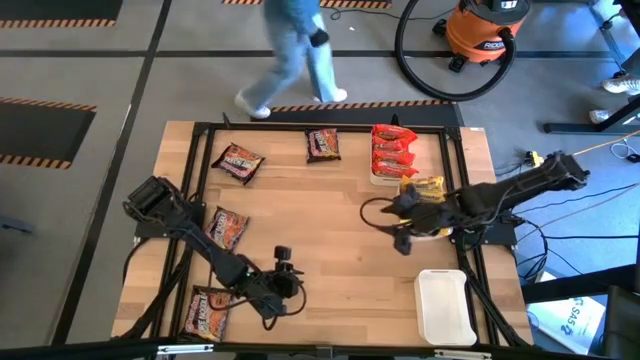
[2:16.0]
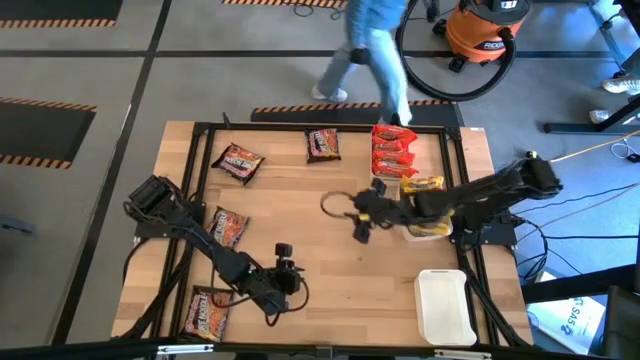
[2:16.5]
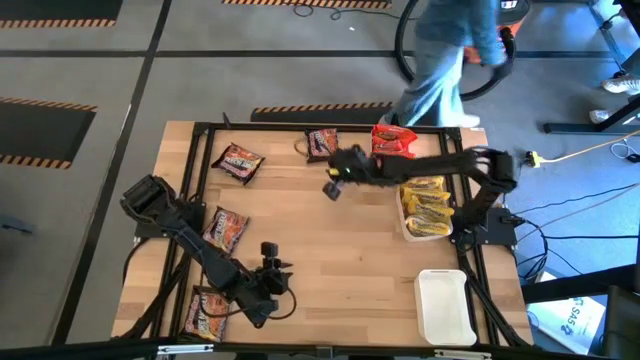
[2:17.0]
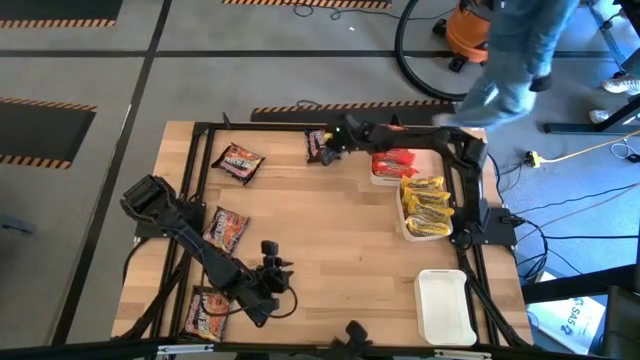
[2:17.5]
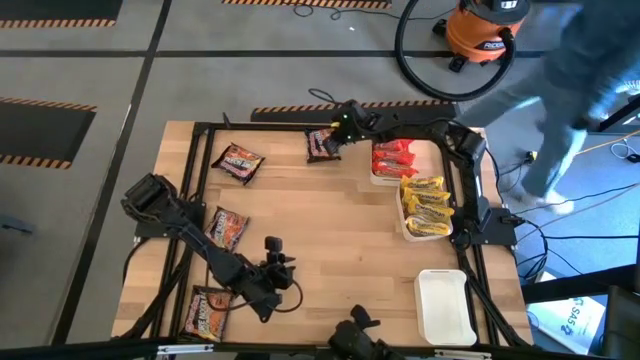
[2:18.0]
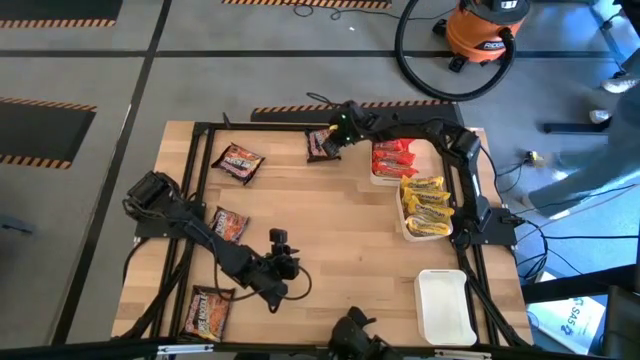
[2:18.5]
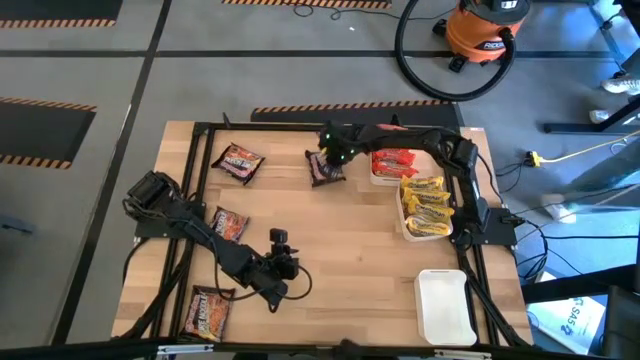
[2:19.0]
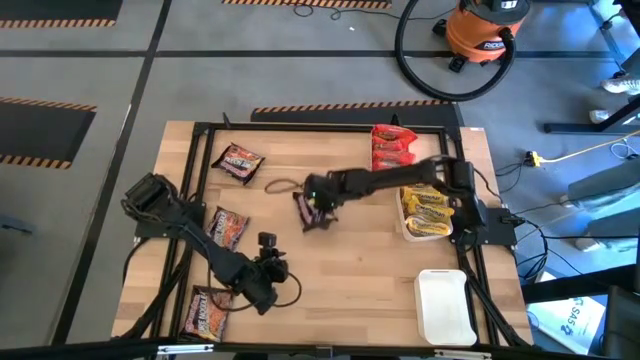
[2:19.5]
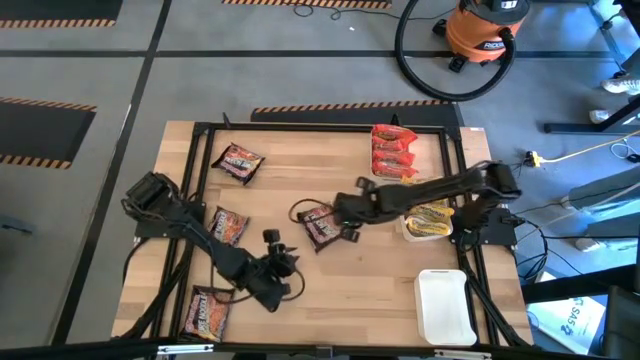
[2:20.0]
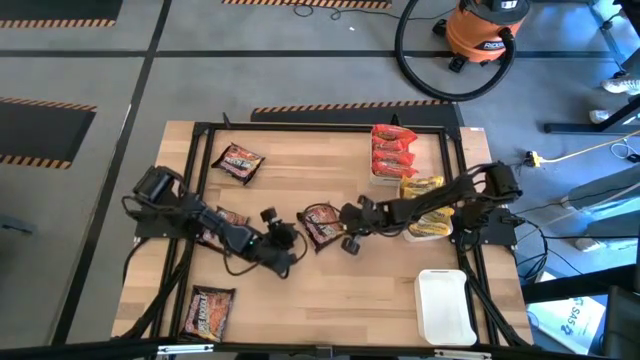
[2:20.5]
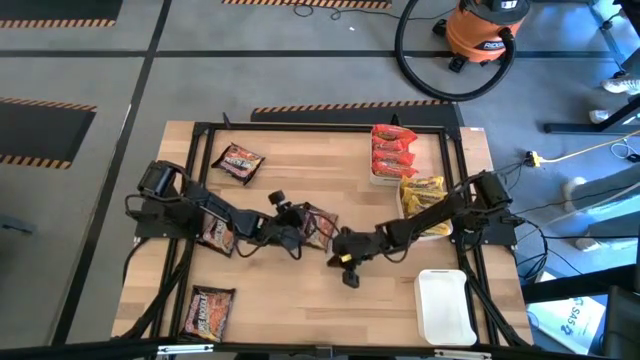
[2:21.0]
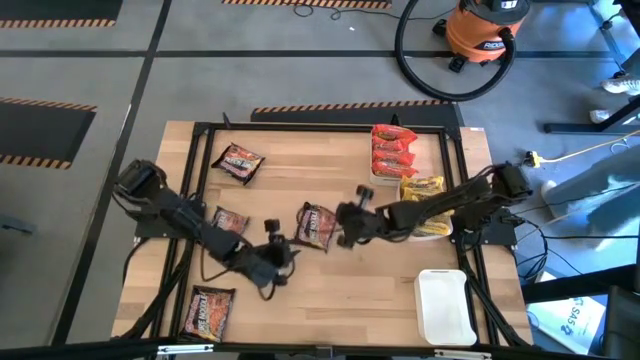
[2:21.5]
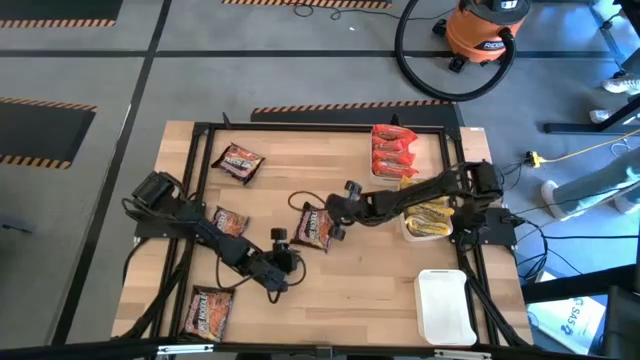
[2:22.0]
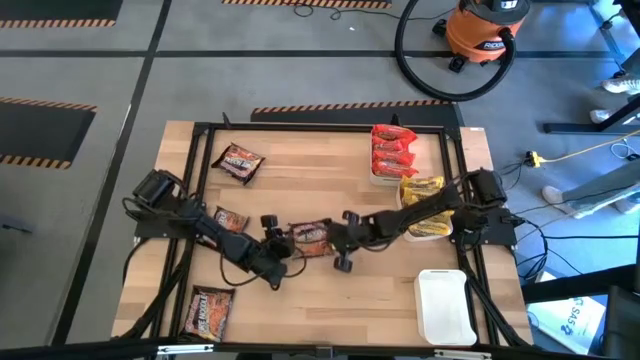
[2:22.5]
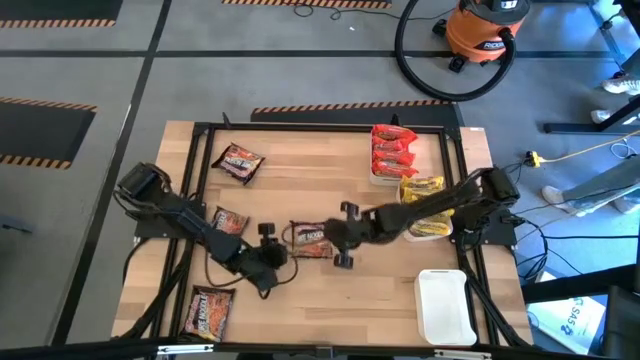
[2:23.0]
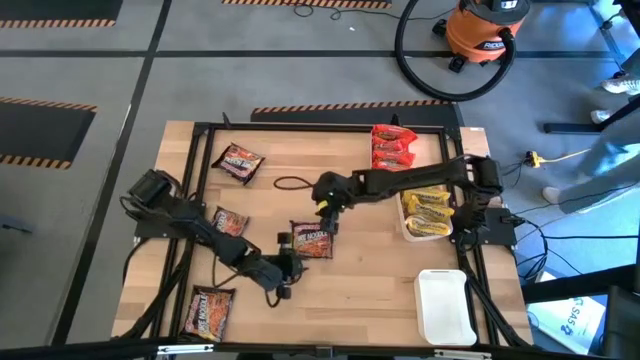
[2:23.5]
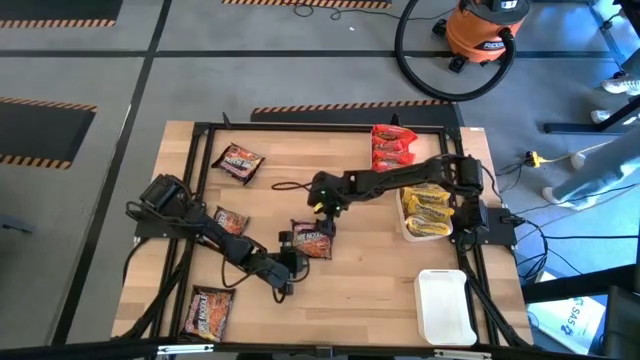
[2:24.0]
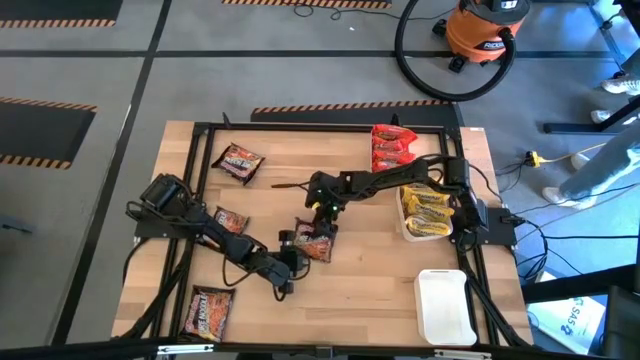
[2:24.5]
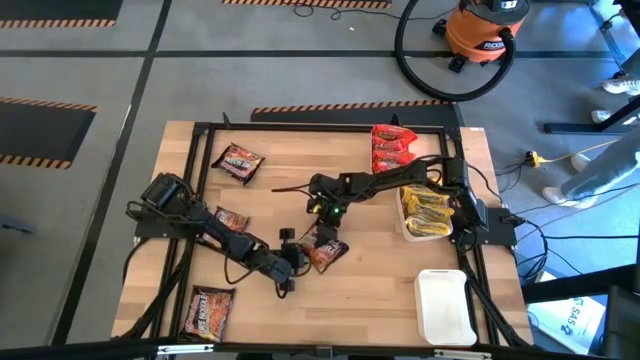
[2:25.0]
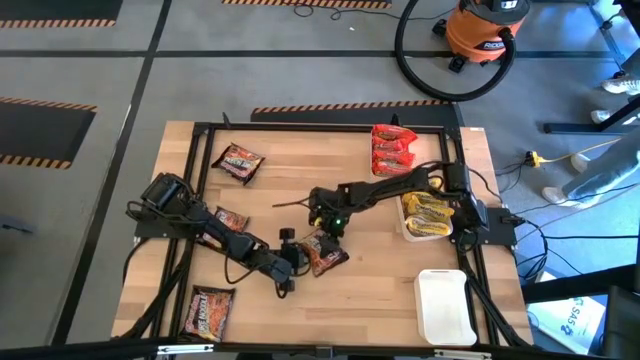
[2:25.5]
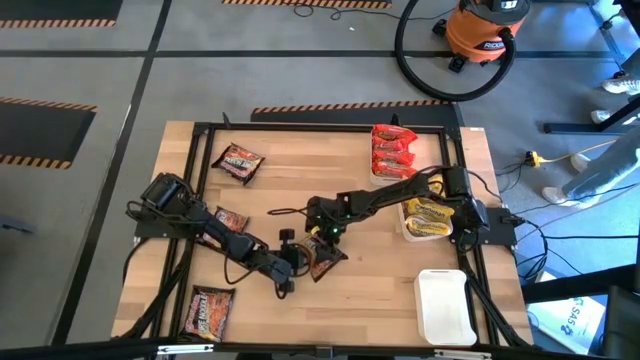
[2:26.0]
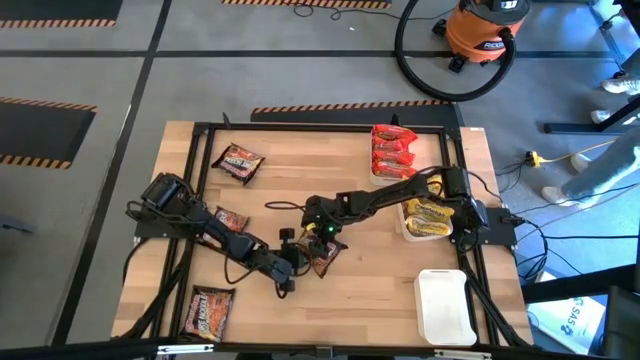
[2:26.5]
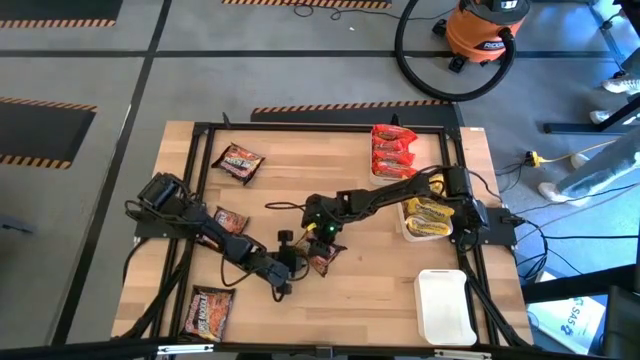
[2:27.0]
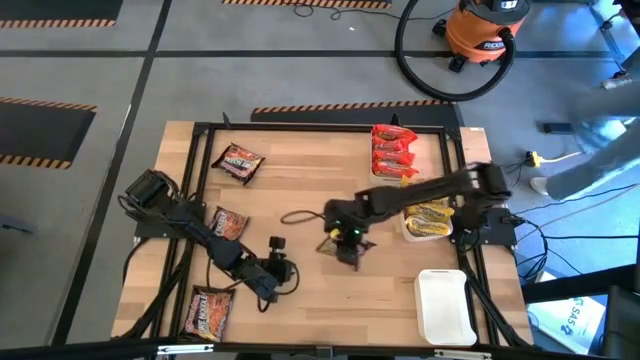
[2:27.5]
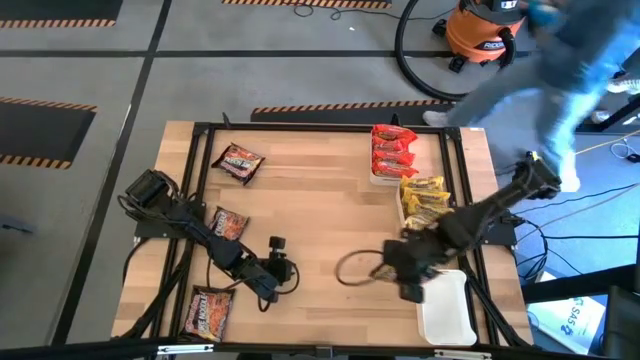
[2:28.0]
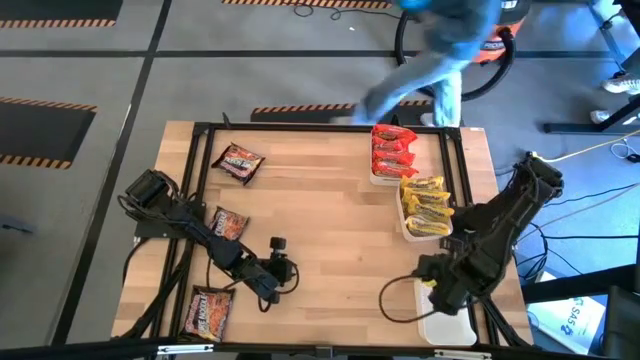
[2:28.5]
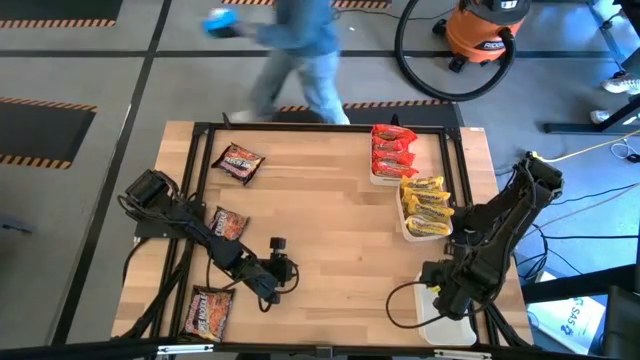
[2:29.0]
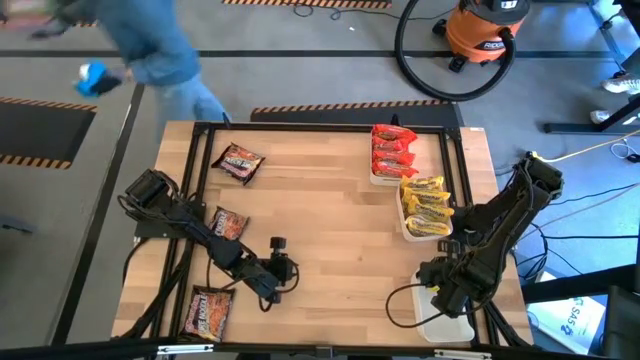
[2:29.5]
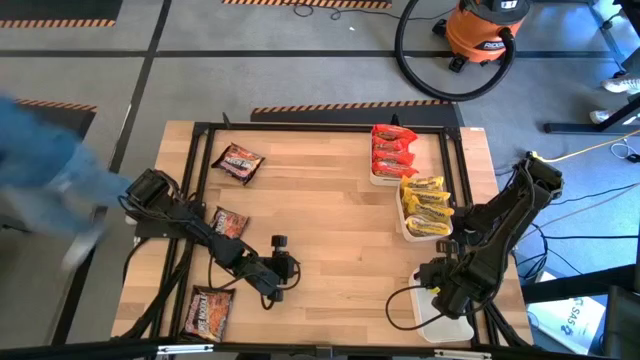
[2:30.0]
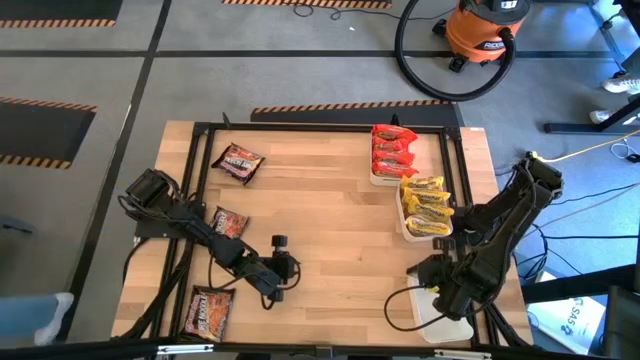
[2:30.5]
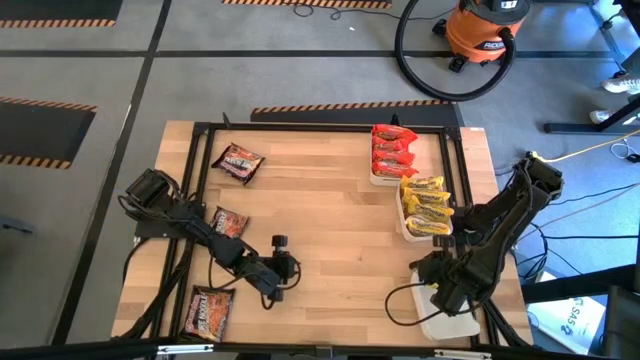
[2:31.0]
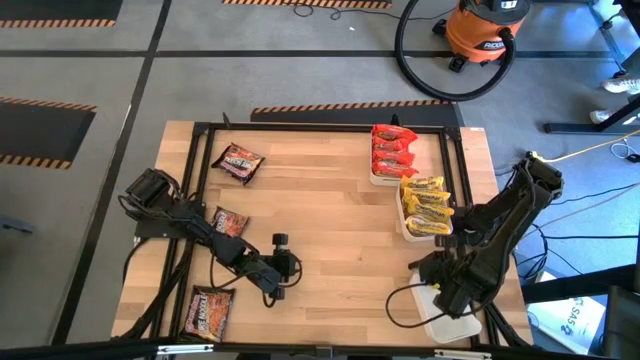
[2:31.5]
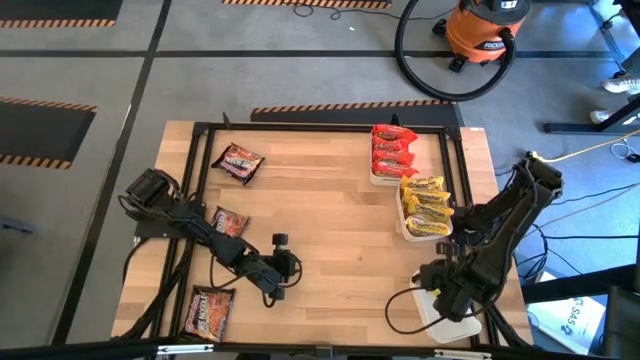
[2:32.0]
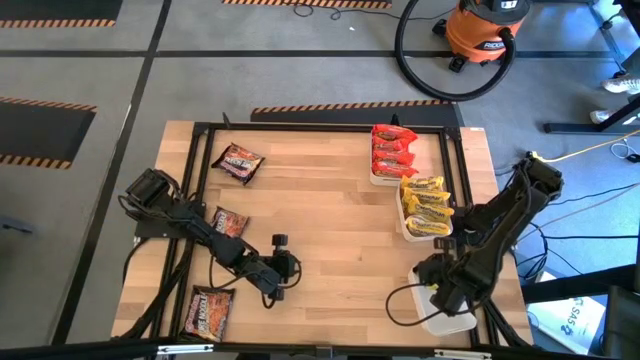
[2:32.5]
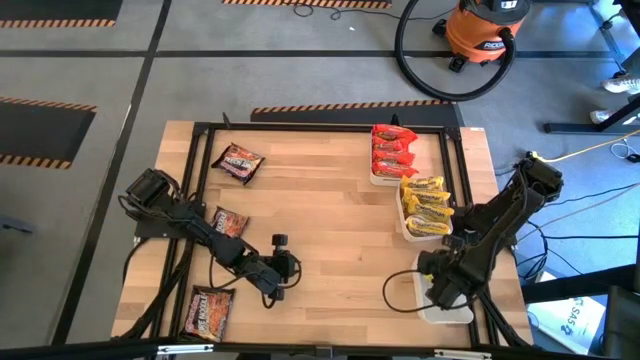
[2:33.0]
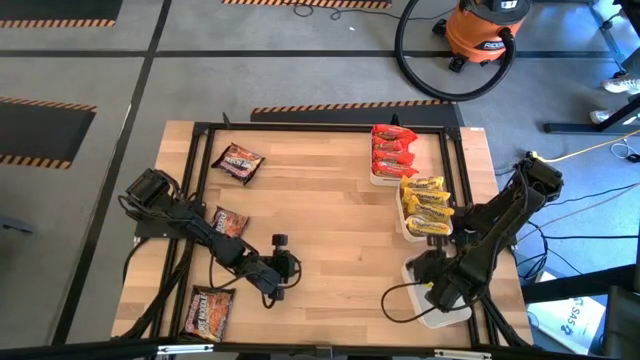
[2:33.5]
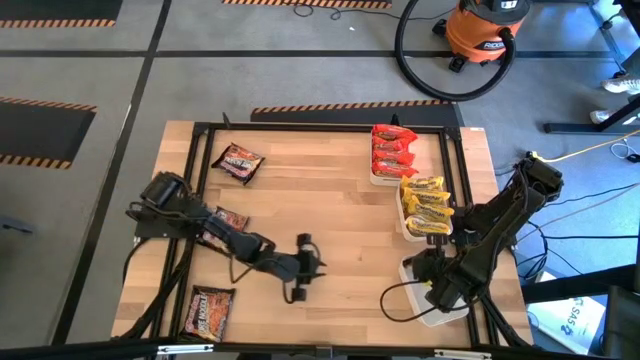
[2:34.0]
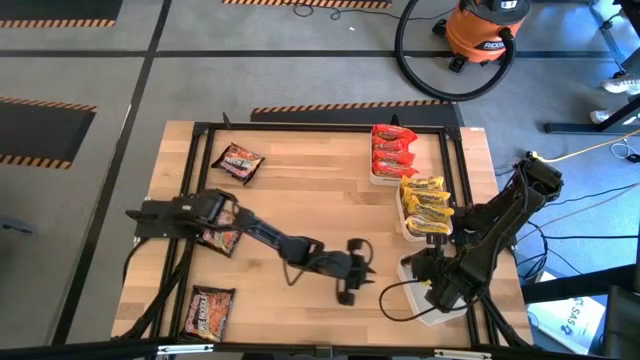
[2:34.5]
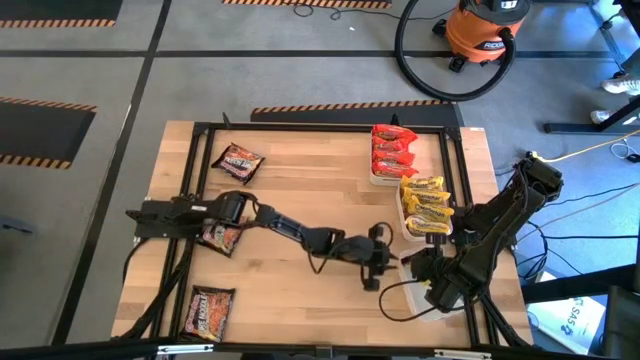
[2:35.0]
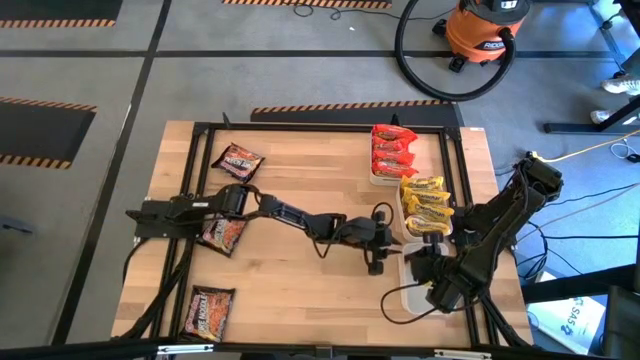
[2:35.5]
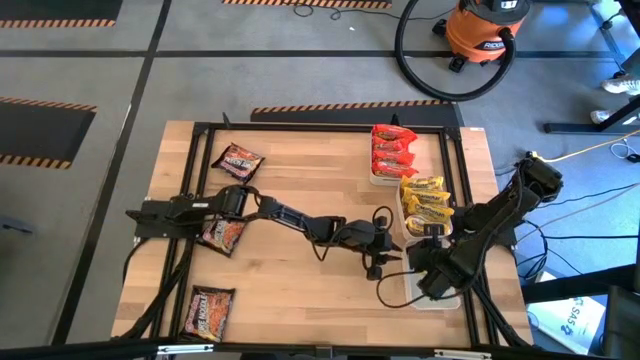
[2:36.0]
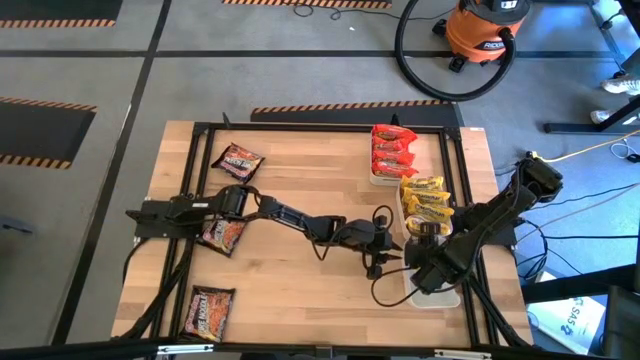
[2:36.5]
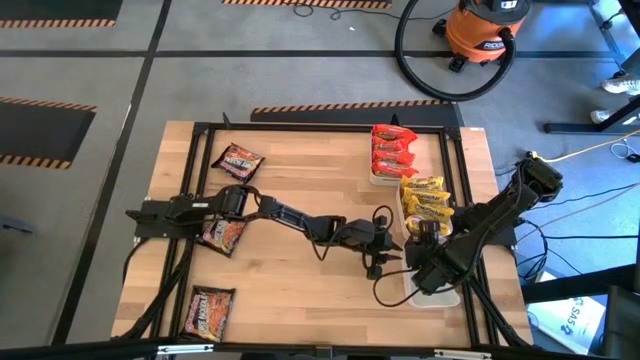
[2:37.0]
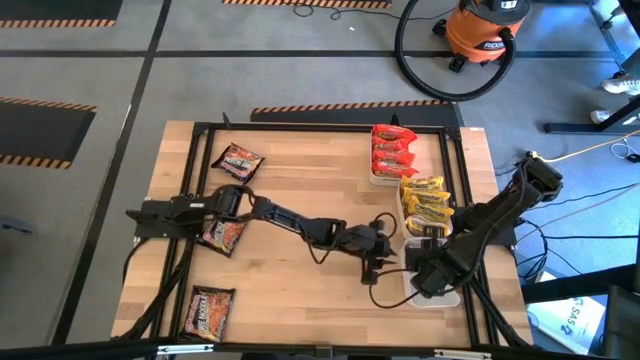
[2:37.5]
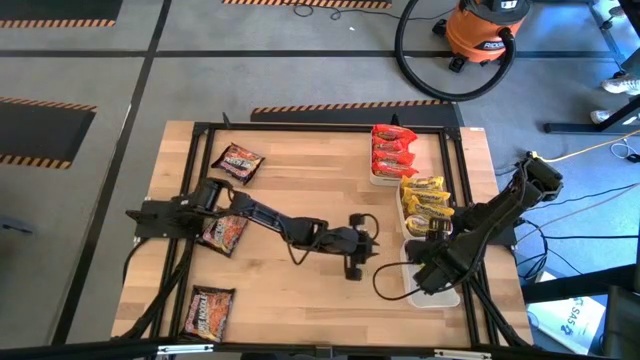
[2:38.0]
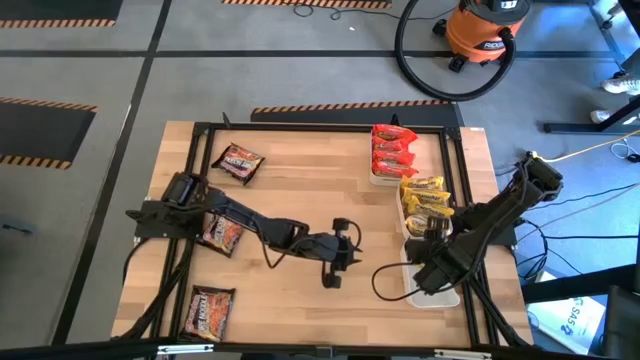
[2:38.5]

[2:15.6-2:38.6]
Task: Sort Maruchan noodles
Put the black noodle pack into the bottom white bin
